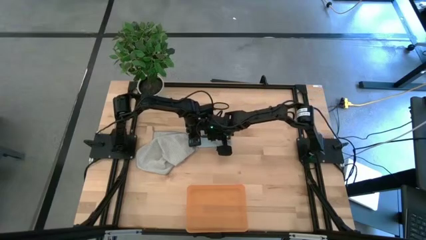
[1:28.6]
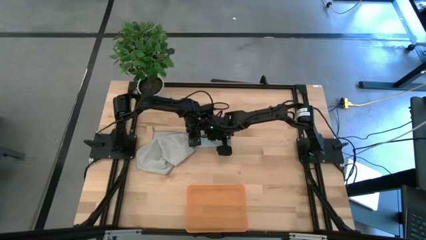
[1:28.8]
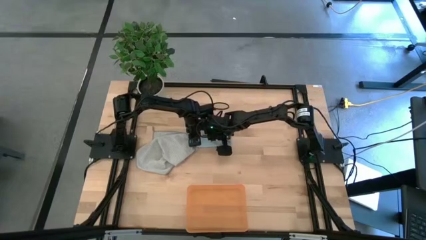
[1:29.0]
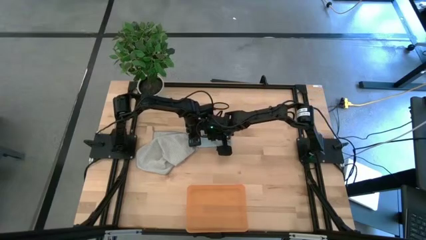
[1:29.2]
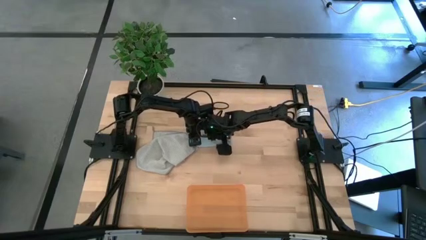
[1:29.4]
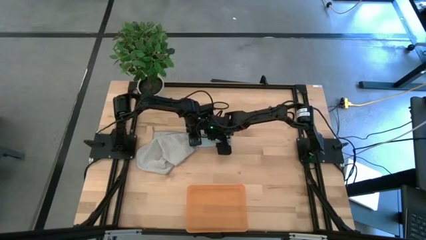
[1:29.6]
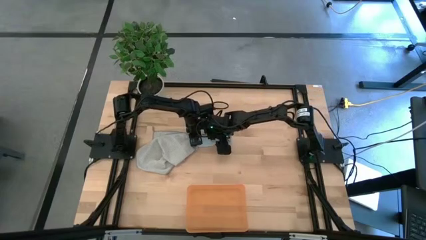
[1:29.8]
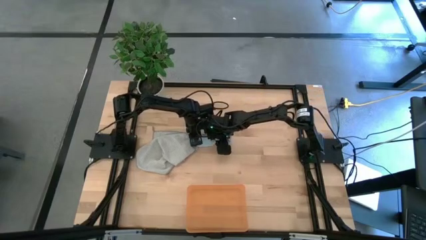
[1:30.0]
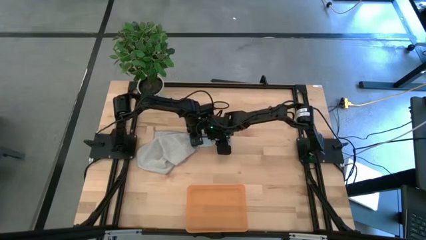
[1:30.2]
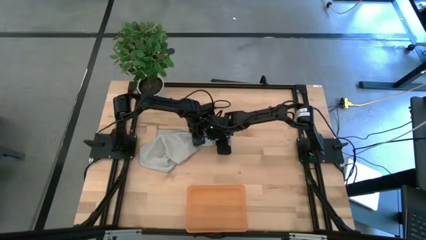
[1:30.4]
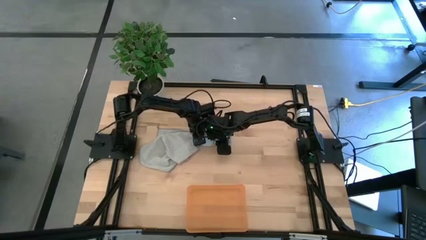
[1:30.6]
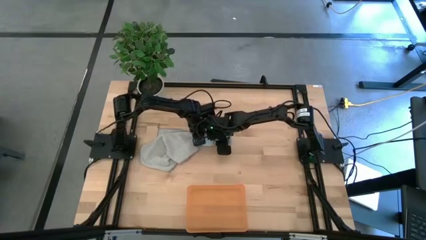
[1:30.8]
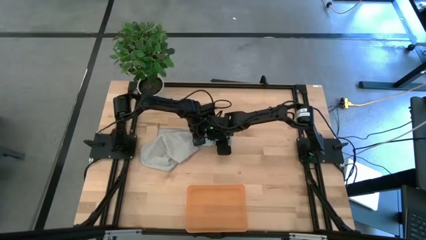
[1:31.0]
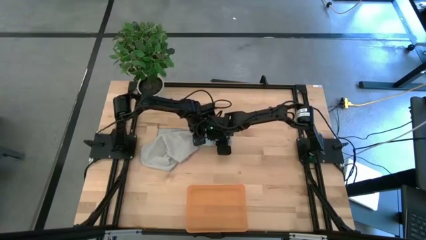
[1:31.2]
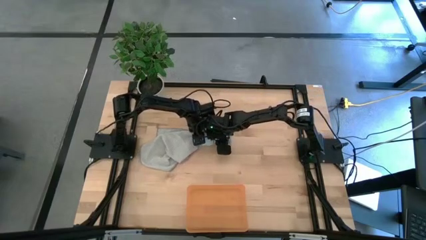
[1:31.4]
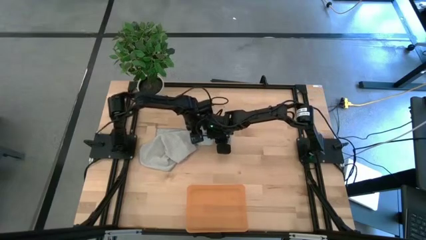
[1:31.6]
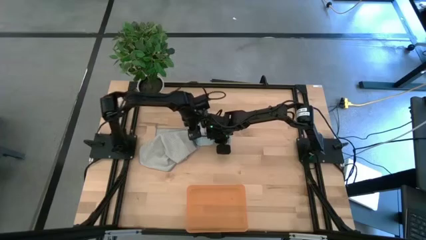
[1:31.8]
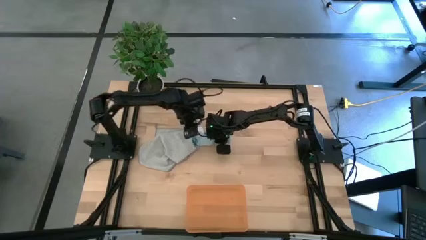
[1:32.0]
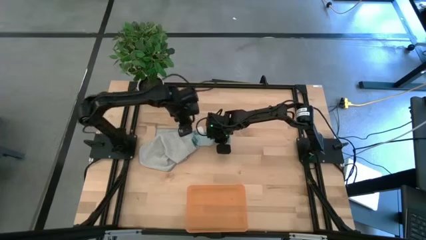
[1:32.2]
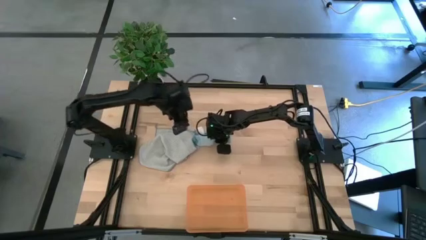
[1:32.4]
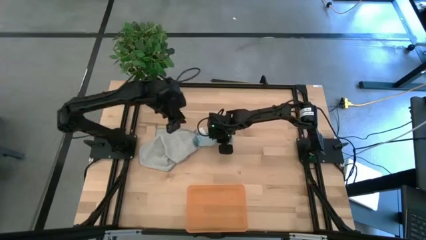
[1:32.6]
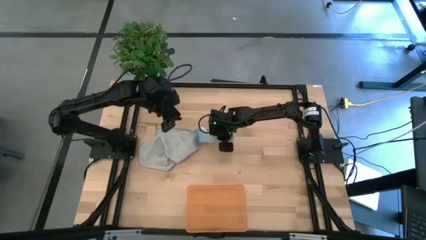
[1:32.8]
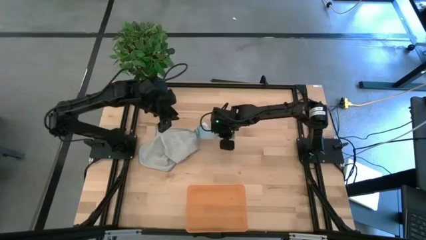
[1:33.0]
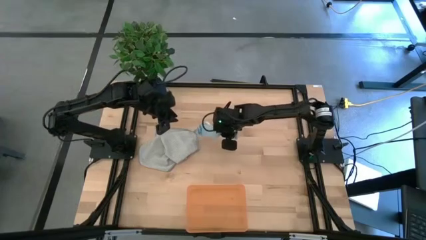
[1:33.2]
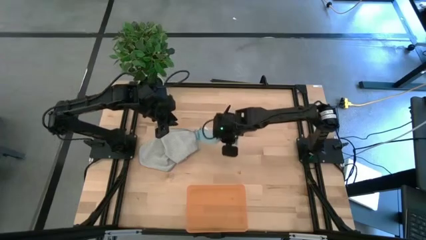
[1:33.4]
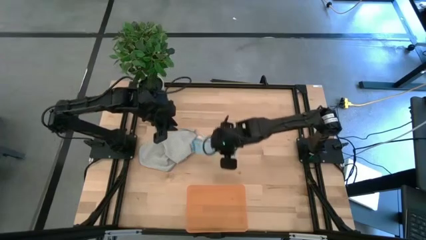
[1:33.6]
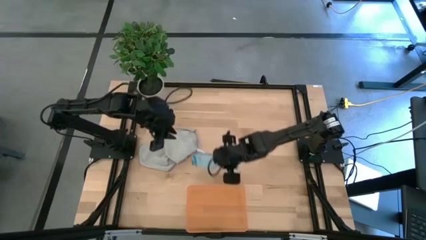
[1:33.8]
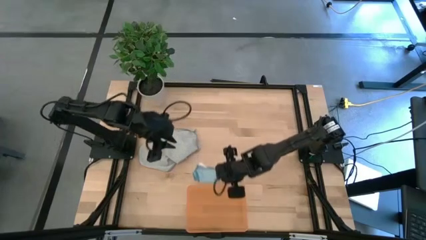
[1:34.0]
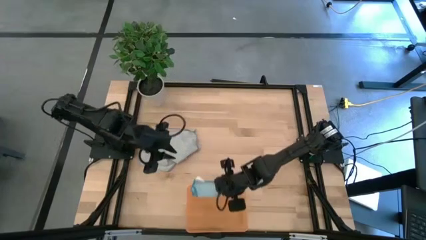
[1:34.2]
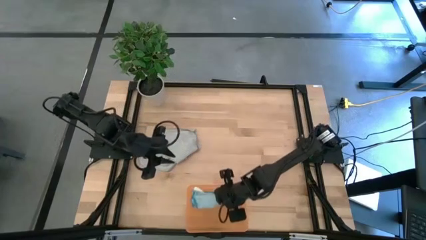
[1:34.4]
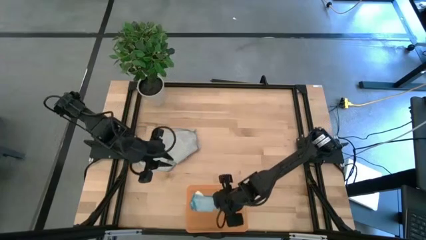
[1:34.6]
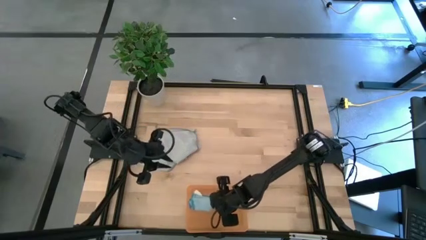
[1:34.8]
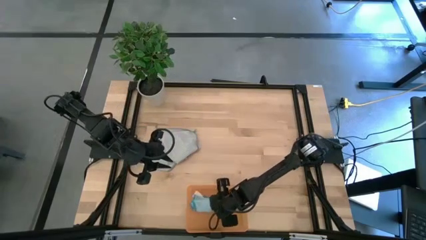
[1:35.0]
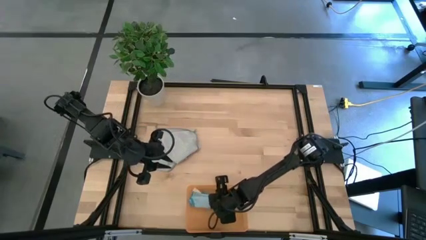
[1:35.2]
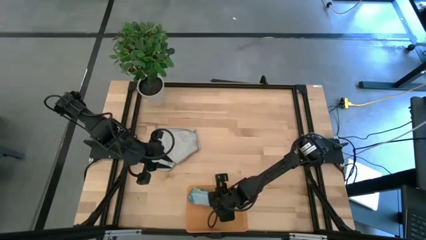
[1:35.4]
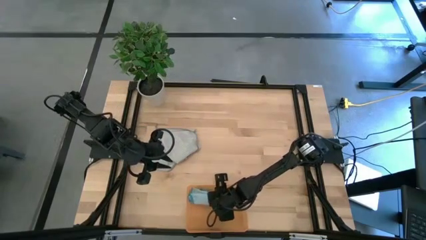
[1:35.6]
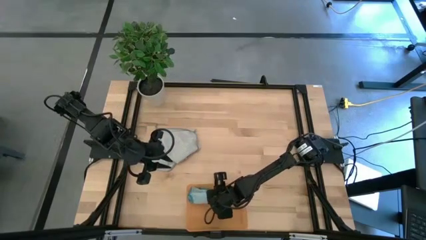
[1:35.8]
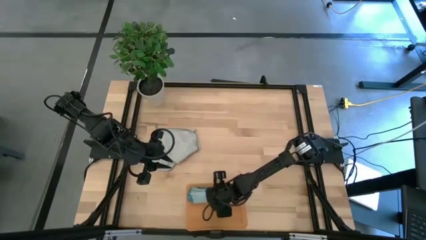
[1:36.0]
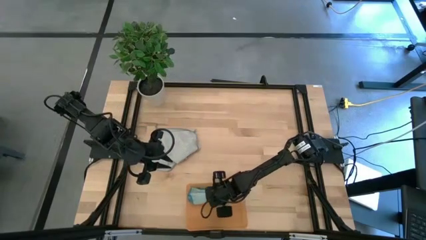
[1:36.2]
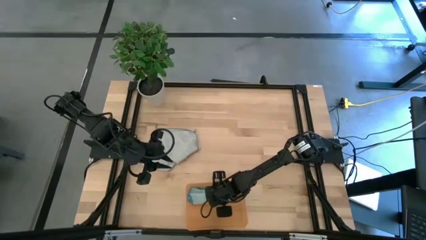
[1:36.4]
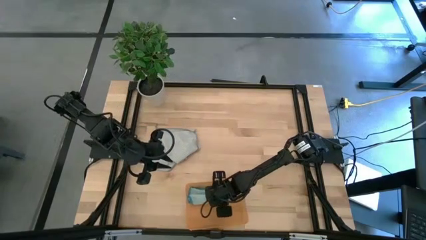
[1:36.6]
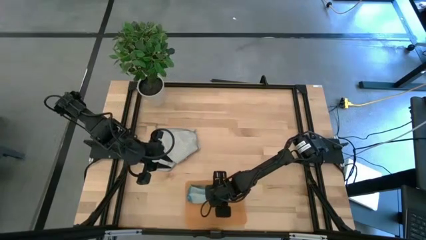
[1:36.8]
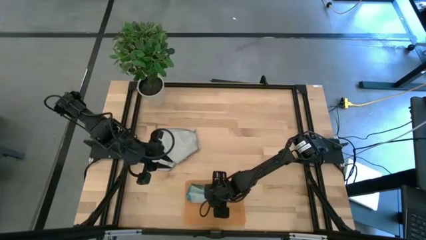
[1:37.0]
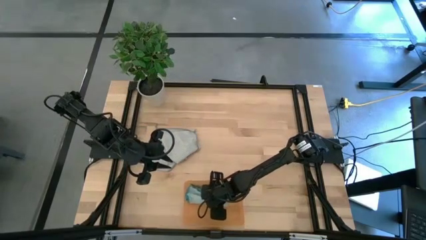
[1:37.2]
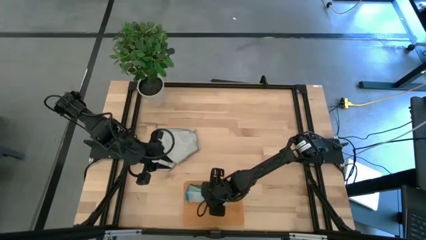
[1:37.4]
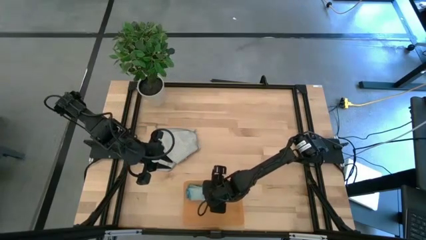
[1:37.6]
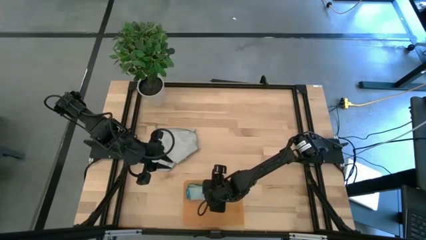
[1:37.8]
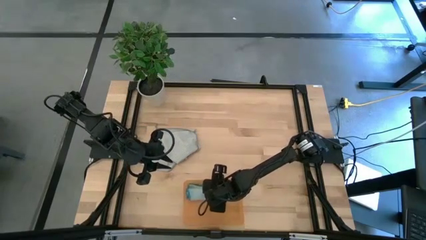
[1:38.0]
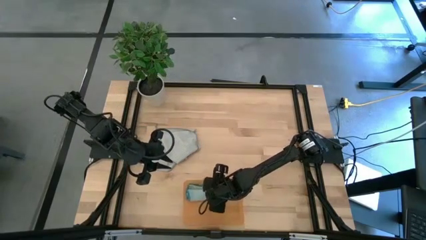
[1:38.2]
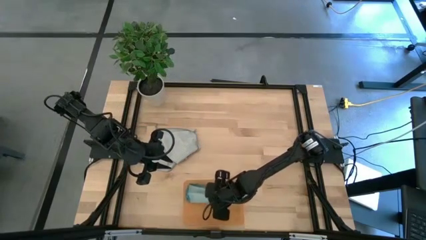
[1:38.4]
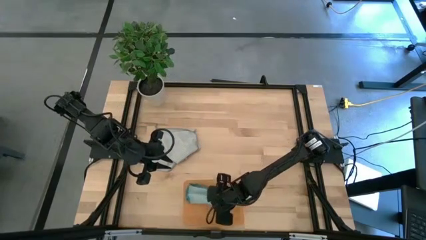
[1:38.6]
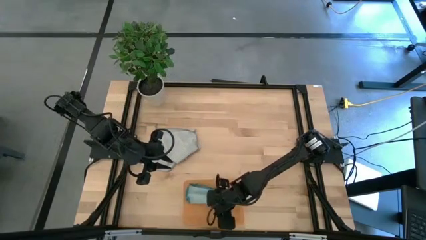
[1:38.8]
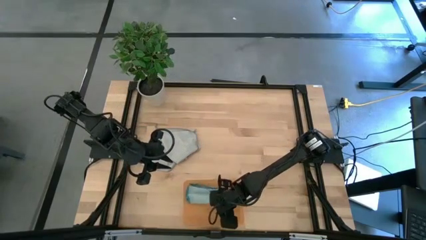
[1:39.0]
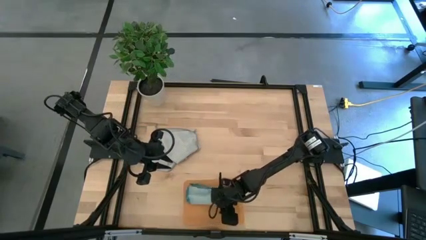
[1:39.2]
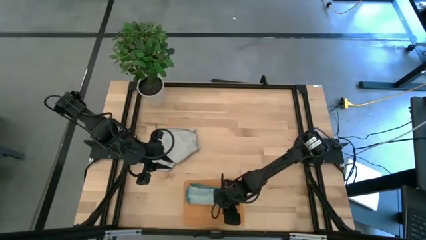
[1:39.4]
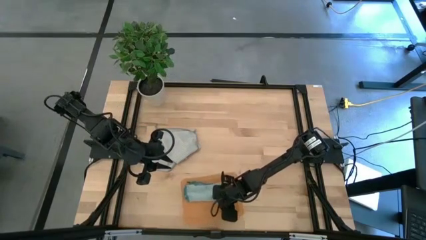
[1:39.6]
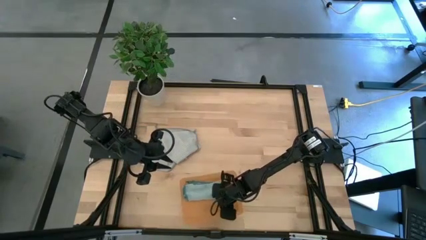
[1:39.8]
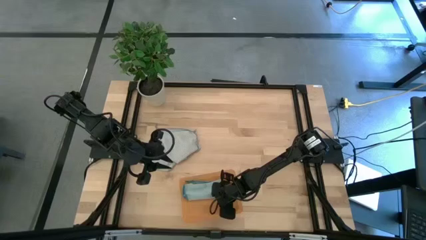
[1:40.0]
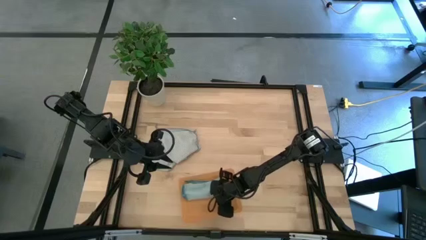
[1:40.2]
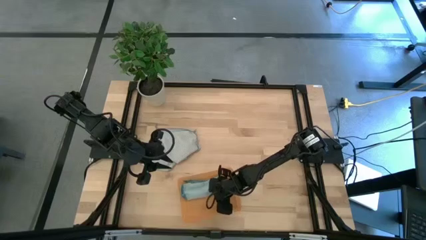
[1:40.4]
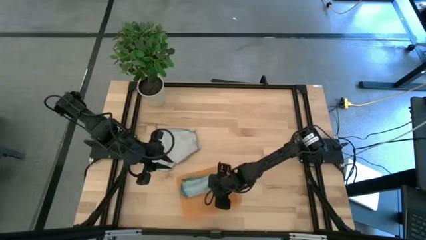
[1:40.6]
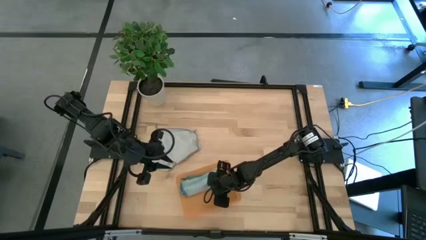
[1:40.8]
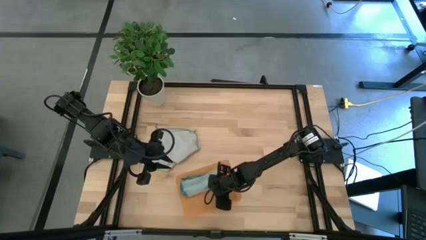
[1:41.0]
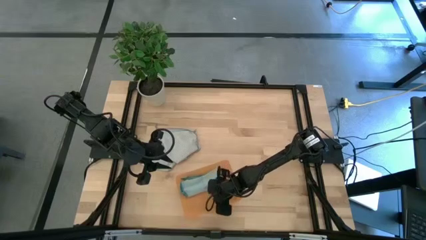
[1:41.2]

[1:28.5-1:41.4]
Task: Roll microfiber towels into tight, uniform cylinder then place into a basket
Put the rolled blue towel into the orange bin

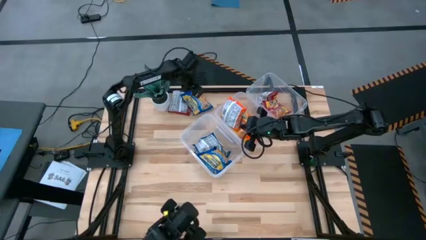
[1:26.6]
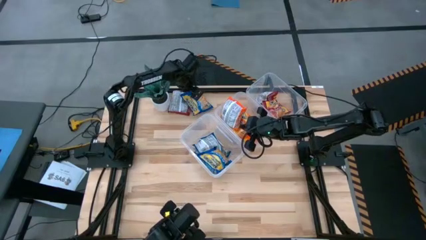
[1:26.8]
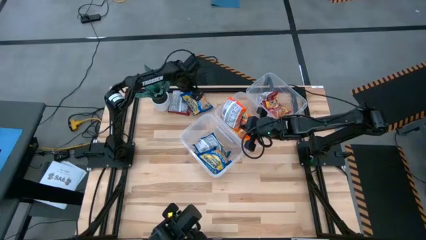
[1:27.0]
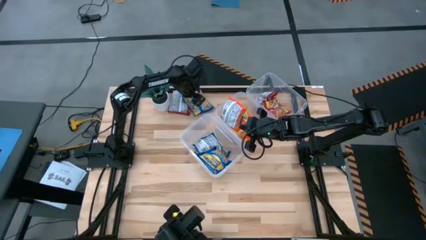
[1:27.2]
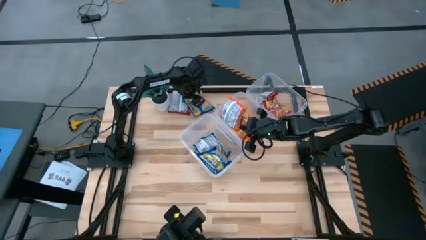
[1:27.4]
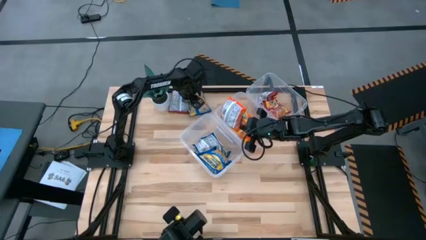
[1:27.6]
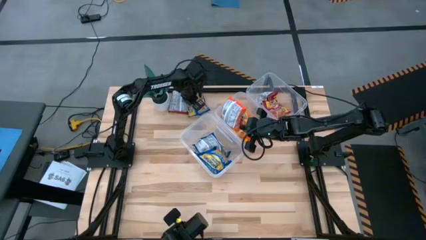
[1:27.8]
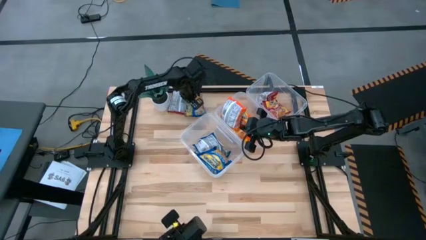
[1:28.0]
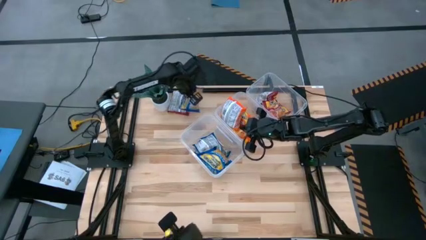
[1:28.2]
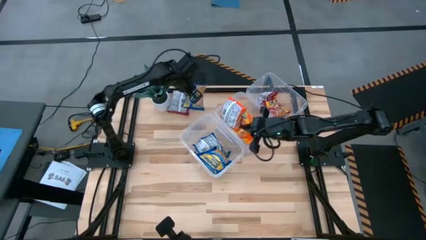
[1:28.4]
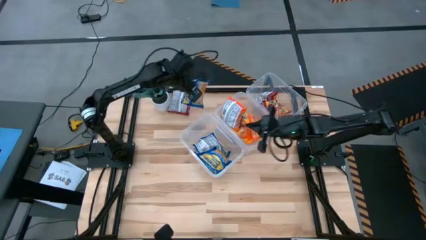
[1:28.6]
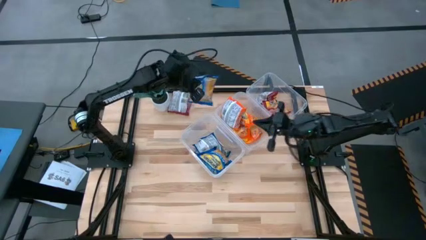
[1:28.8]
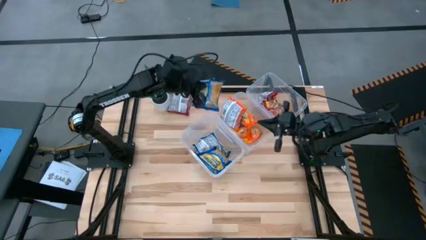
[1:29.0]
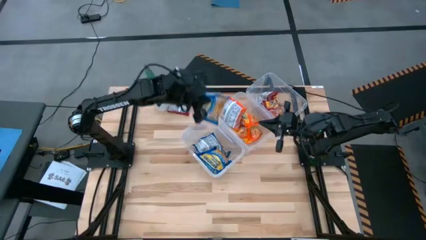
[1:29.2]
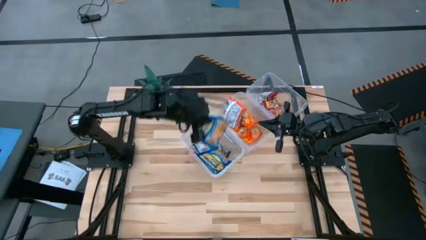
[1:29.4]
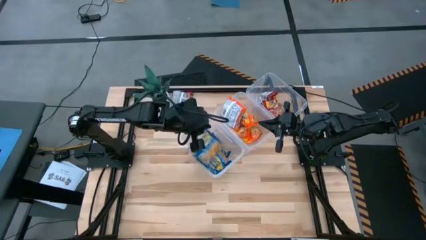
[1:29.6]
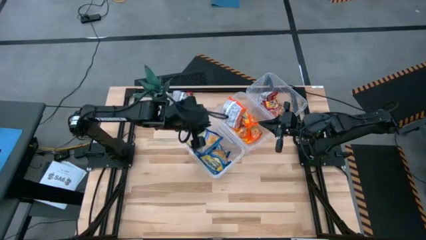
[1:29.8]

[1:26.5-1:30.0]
Task: Sort Maruchan noodles
Put the blue noodle pack into the left transparent bin
